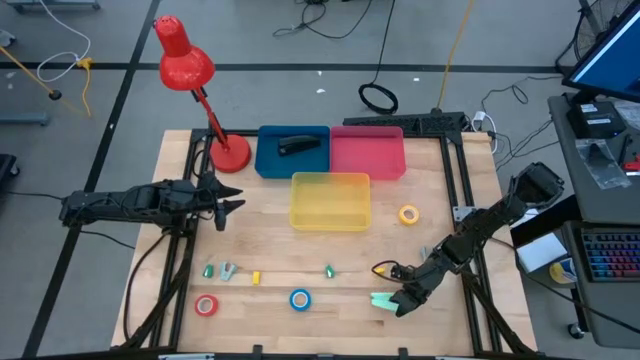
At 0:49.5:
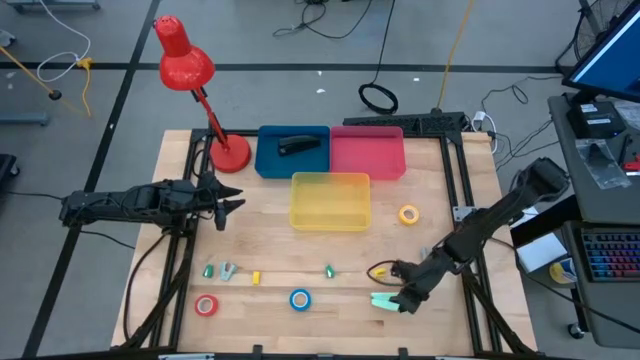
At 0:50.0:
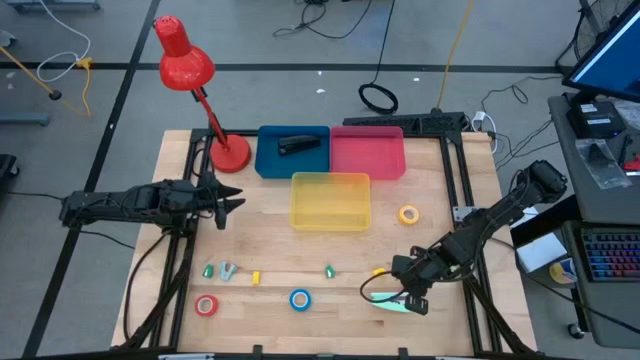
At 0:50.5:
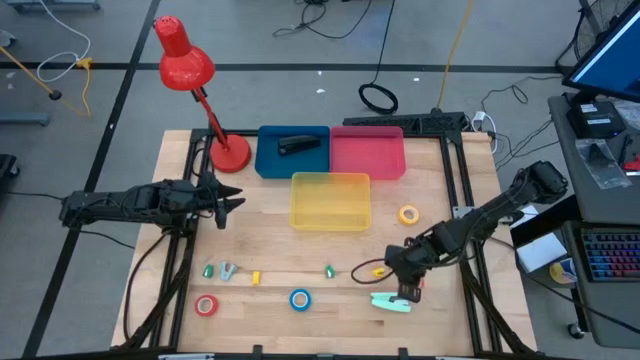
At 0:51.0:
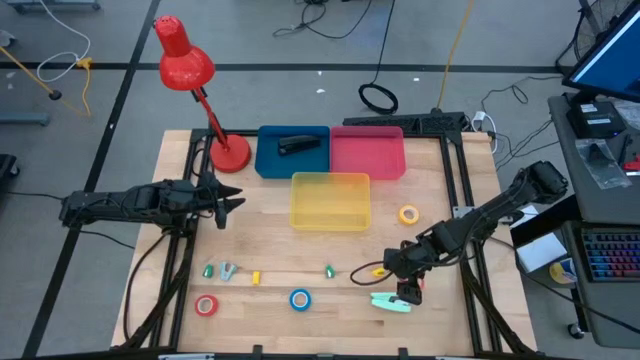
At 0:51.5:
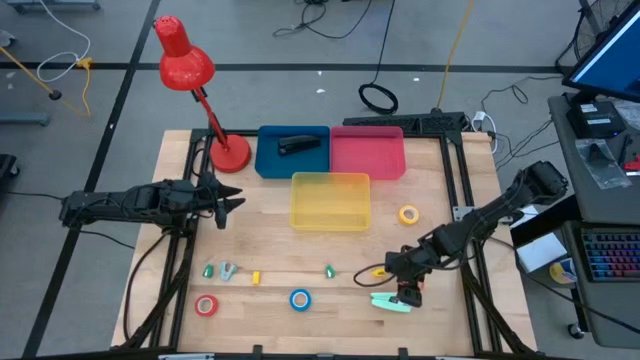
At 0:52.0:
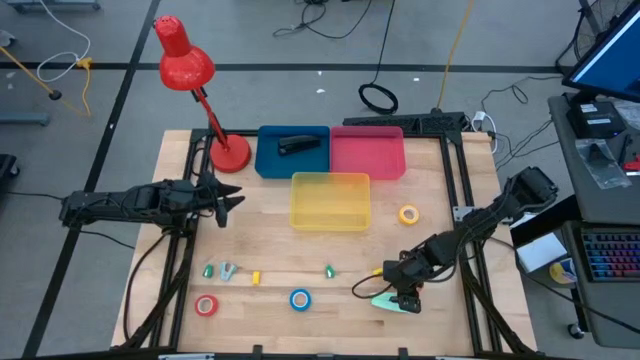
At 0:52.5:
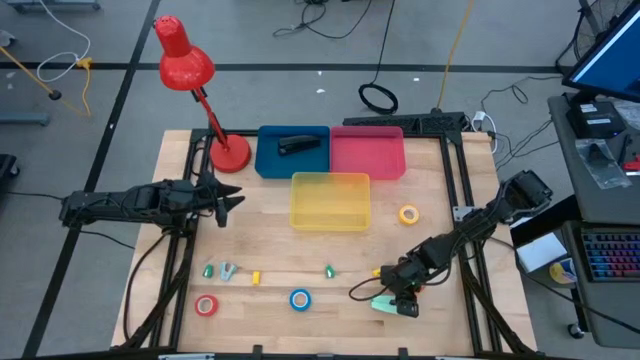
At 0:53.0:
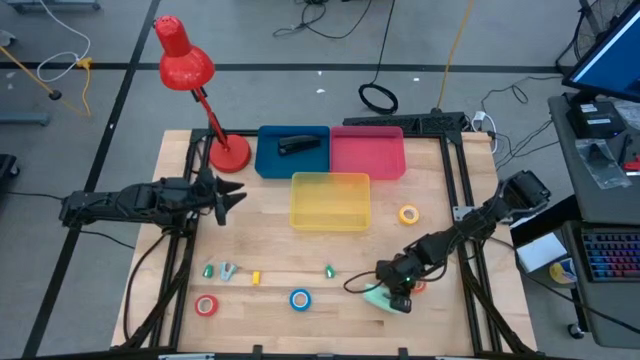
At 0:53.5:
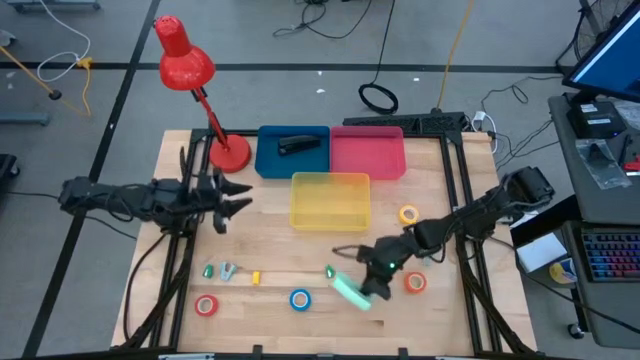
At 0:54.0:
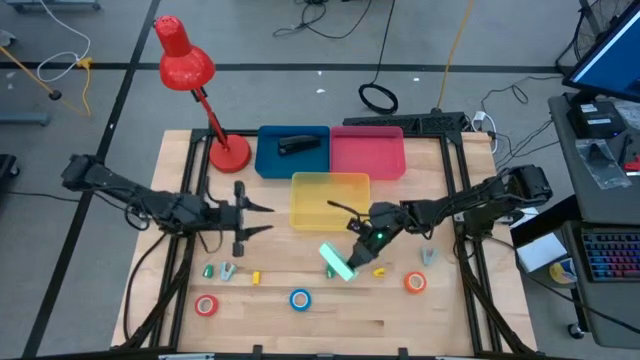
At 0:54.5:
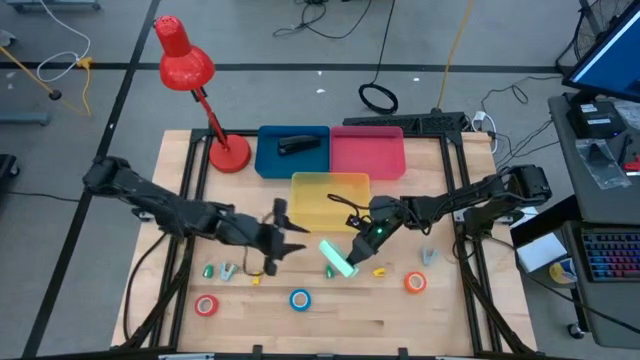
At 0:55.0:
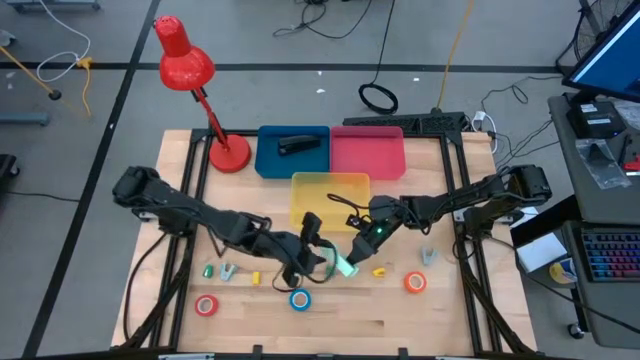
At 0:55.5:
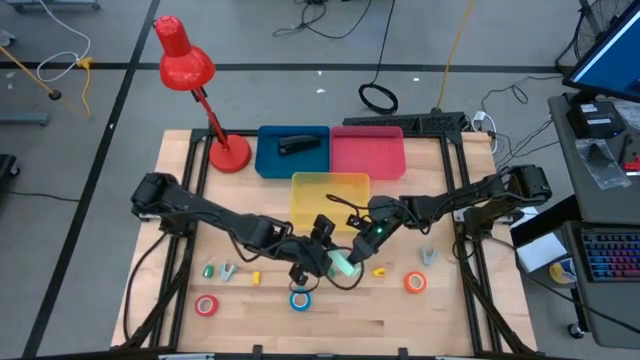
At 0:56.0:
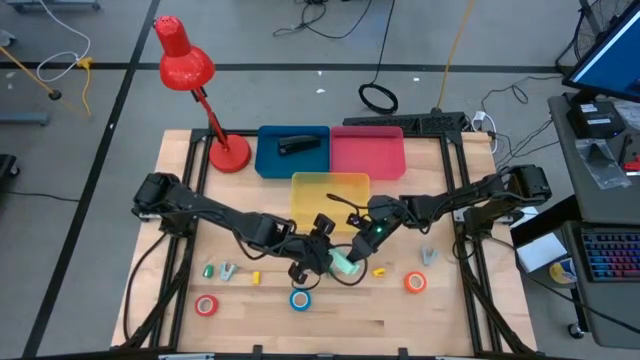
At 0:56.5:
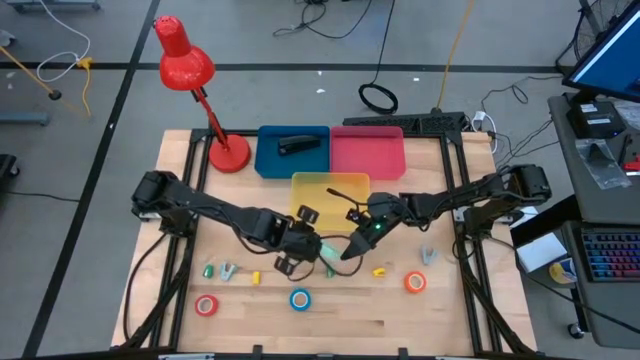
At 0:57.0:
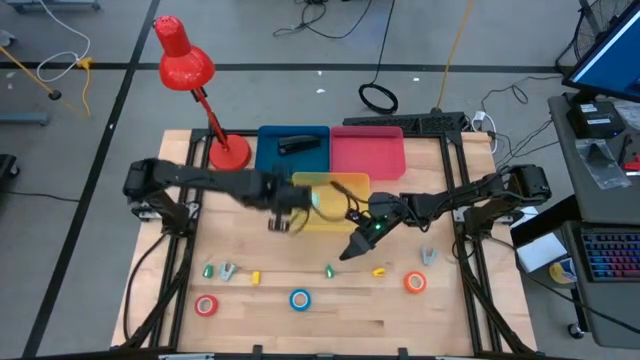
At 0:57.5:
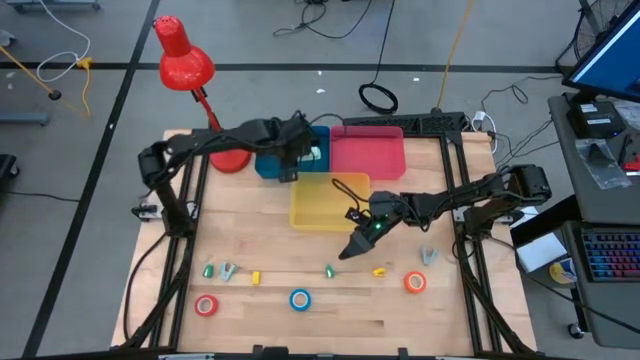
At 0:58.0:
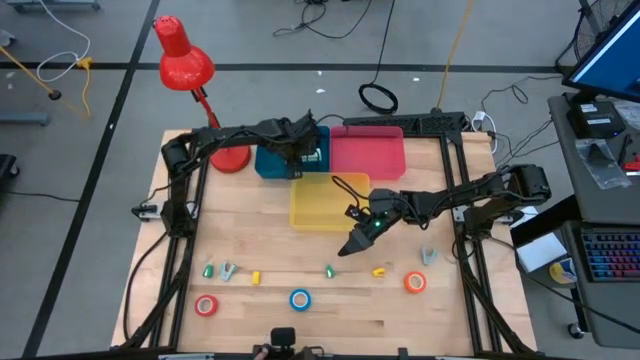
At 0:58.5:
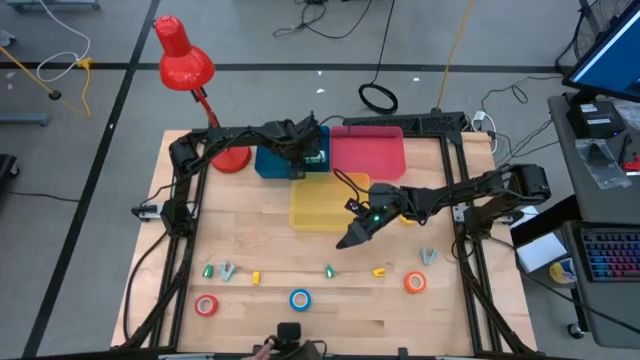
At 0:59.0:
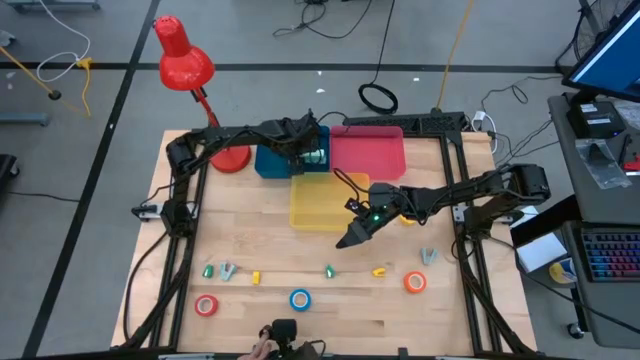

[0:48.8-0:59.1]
Task: Pick and place Stapler, Stapler remover, tape
Put the light green stapler into the blue bin

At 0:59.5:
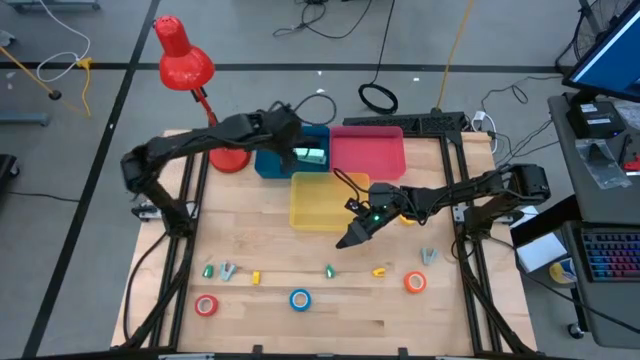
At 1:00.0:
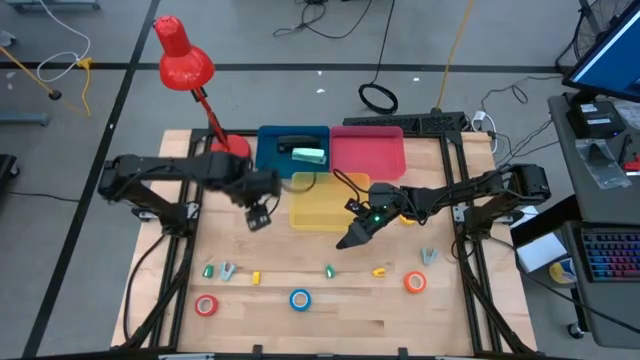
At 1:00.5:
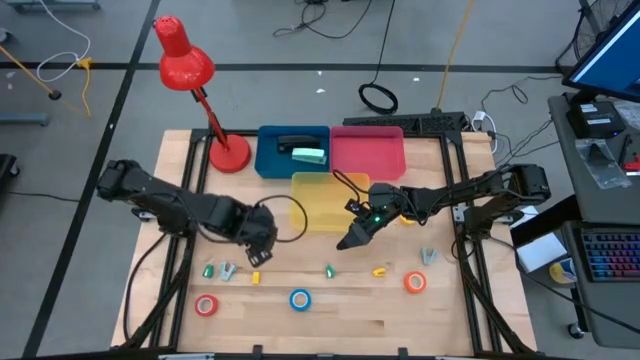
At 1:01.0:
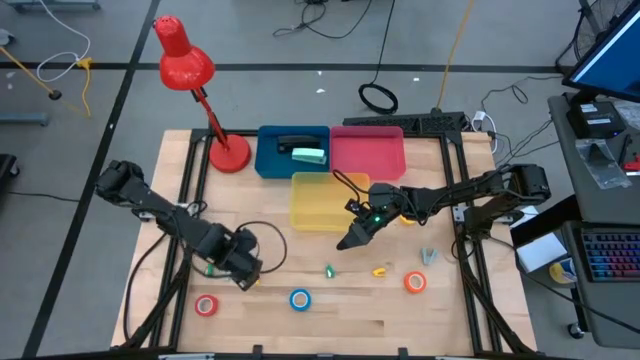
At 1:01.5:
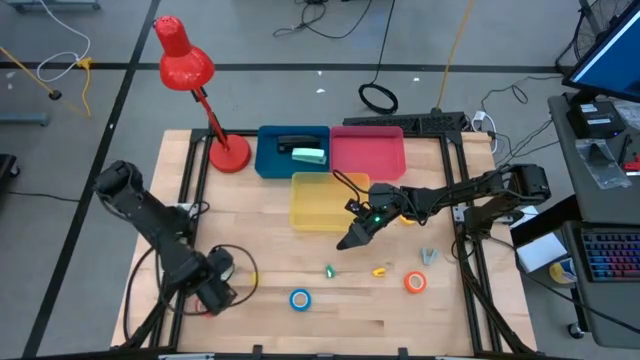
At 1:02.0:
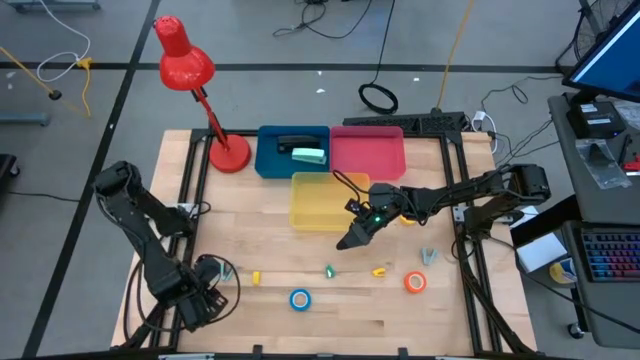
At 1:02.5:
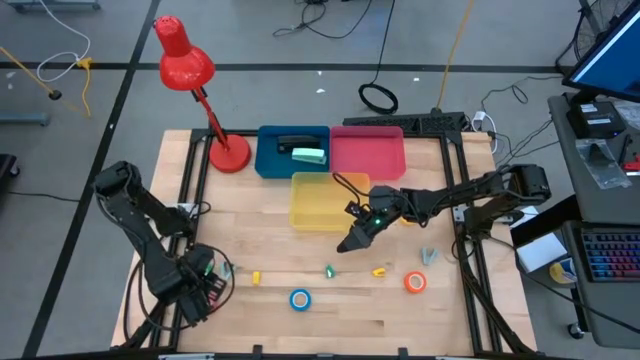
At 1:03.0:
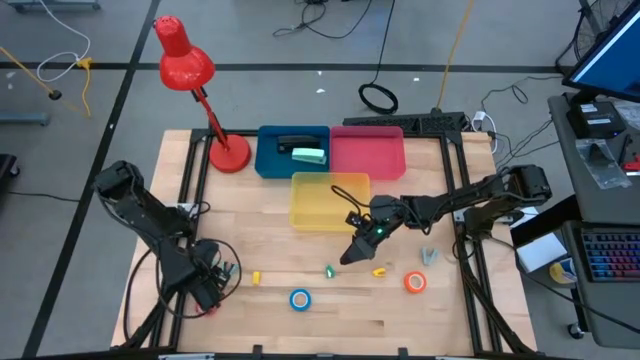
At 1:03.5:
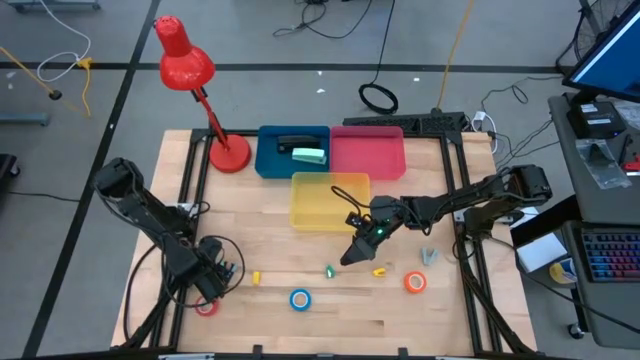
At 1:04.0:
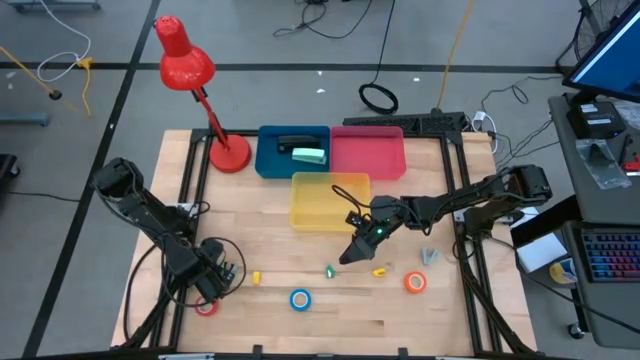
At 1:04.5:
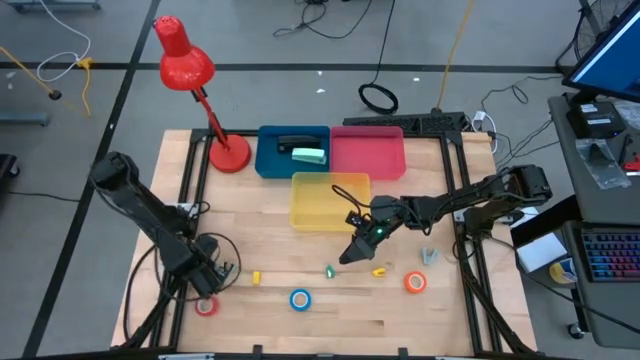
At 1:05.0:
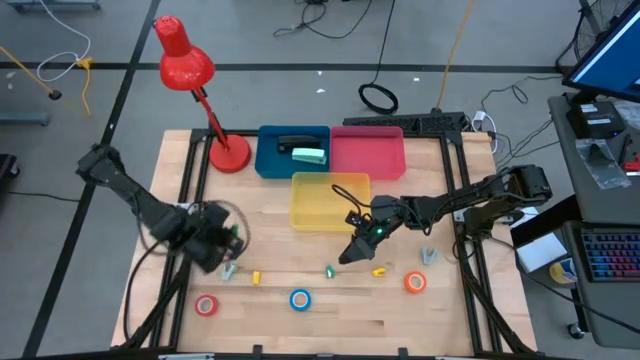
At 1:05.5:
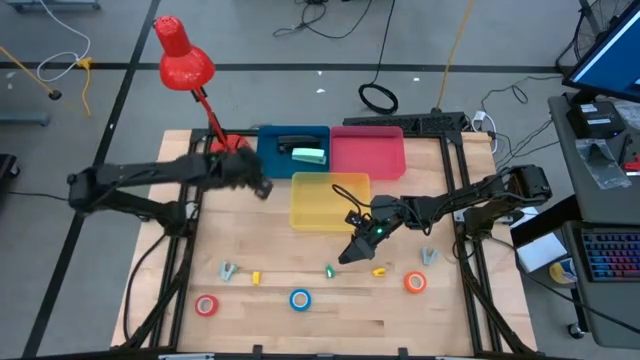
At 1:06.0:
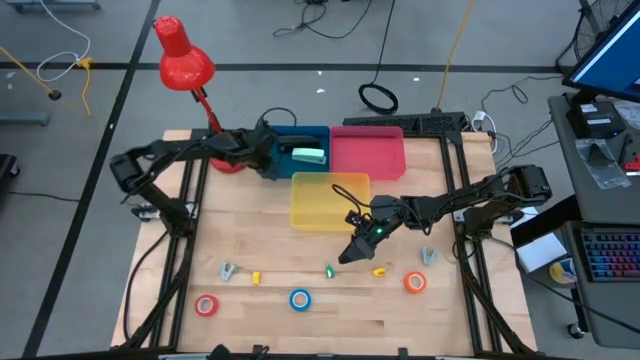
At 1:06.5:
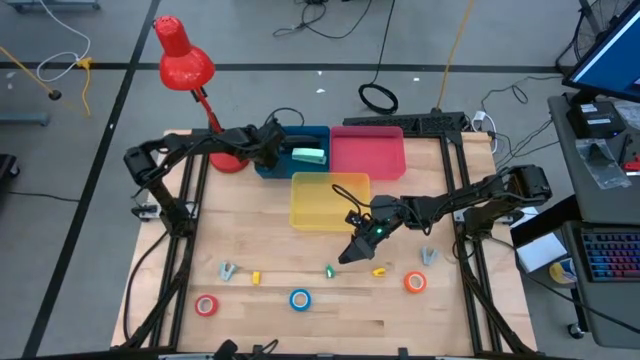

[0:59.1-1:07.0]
Put the left green stapler into the blue bin

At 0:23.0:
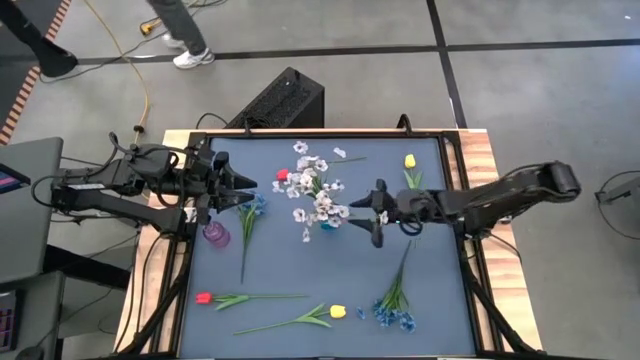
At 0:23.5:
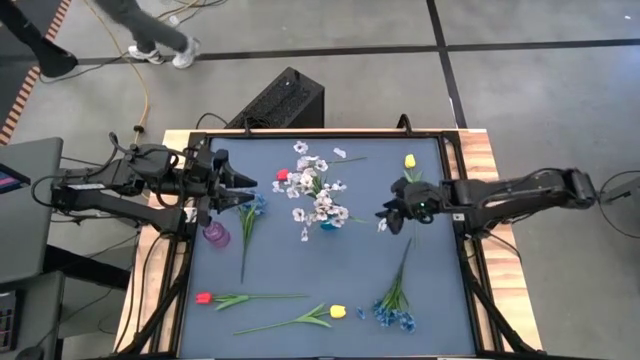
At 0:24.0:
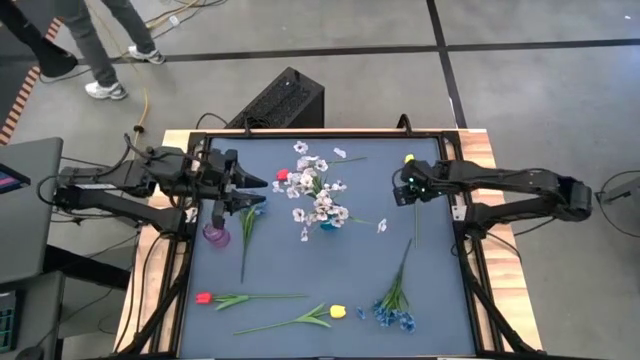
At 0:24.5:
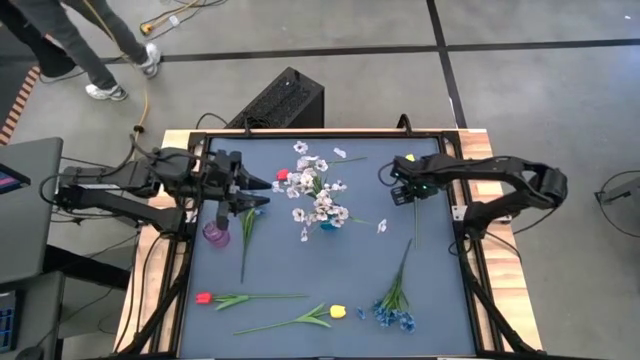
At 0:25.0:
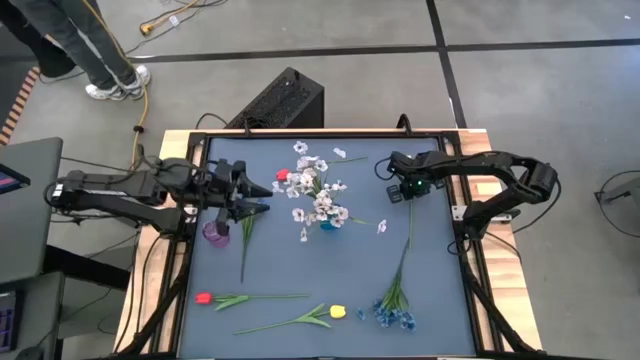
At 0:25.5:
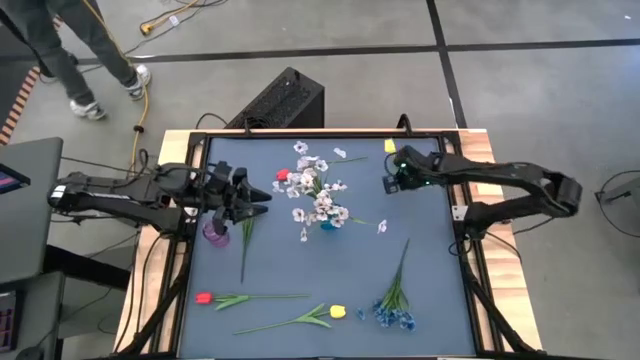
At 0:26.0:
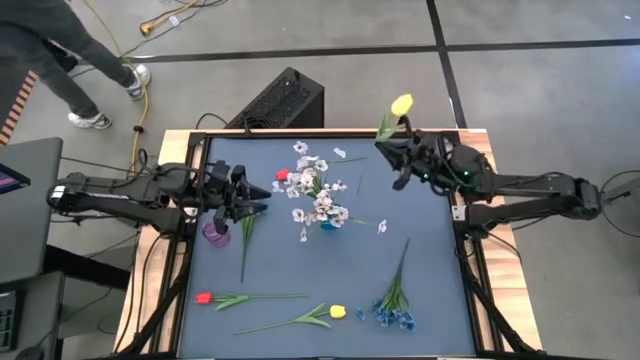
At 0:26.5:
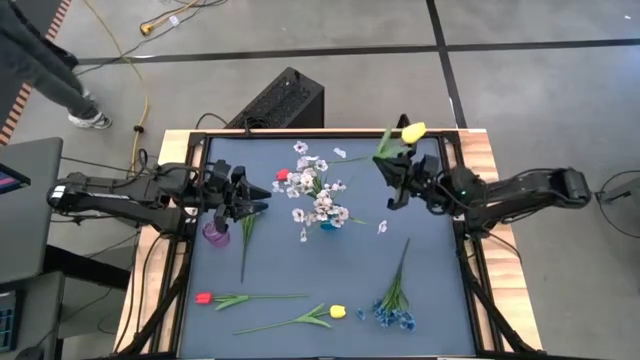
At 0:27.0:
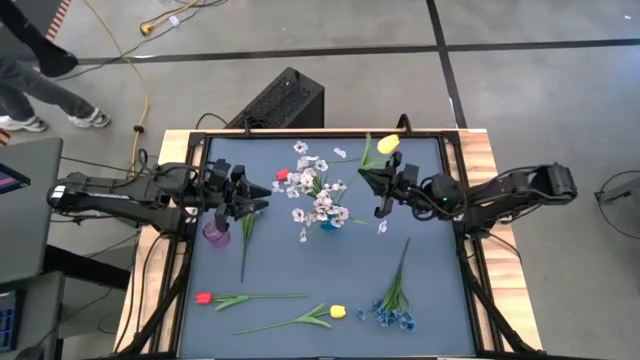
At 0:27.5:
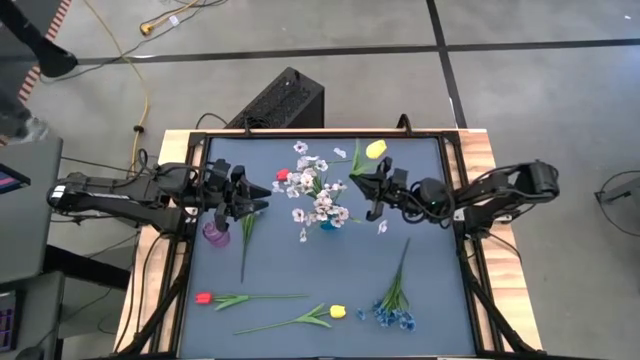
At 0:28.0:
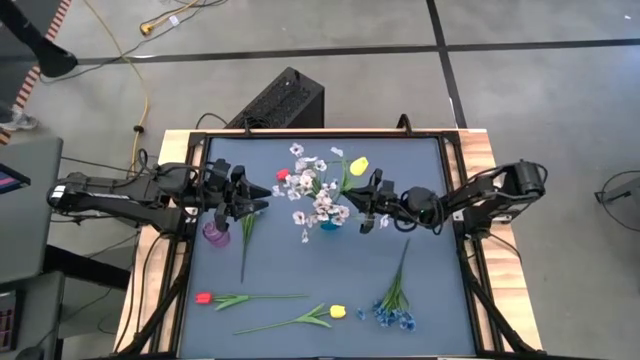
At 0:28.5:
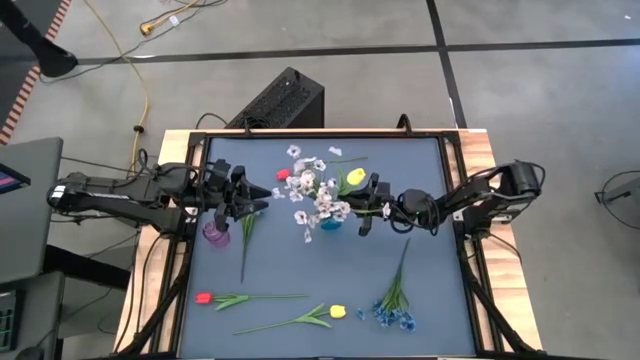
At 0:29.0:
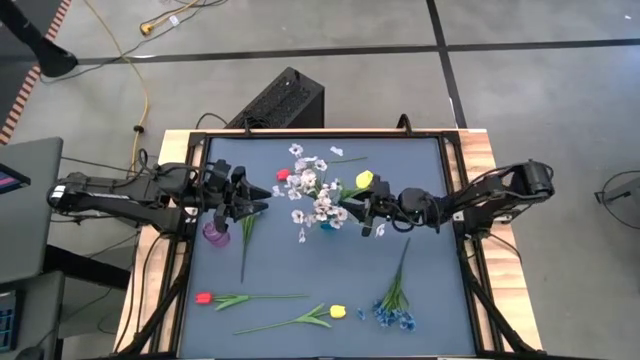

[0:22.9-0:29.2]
Task: Sort flowers into vase by color
Put the top yellow tulip into the blue vase
